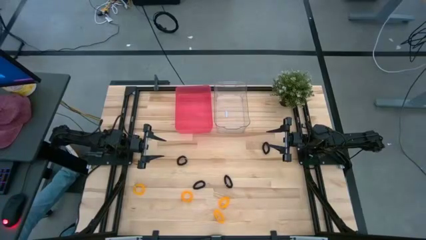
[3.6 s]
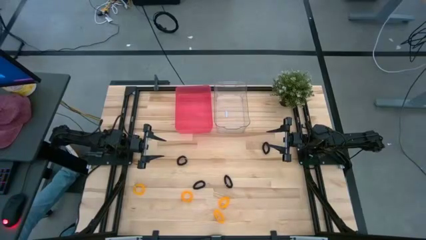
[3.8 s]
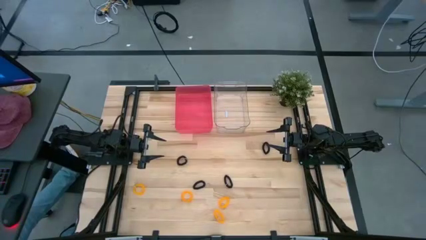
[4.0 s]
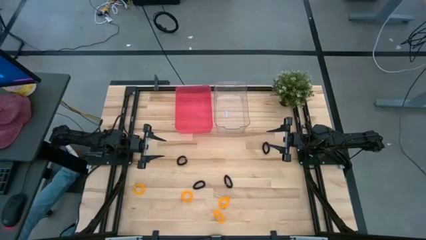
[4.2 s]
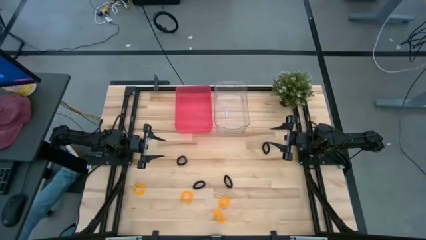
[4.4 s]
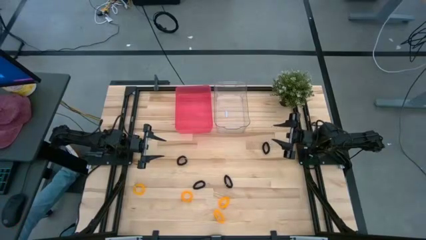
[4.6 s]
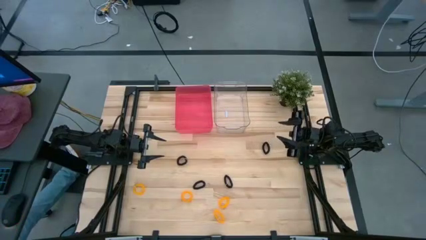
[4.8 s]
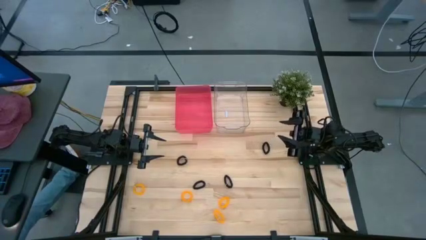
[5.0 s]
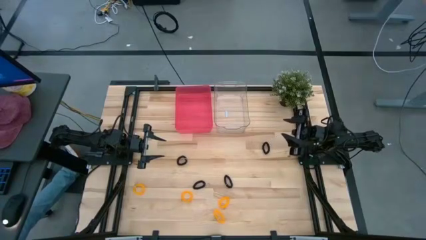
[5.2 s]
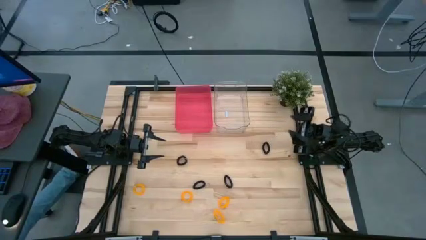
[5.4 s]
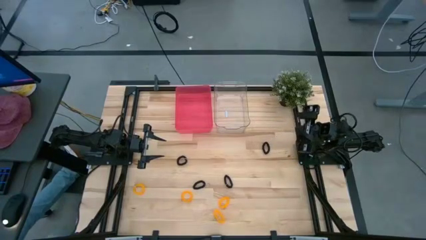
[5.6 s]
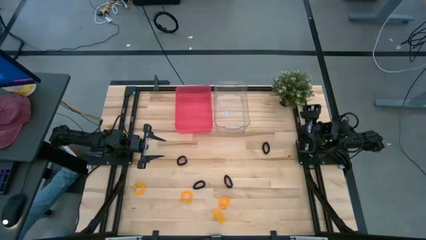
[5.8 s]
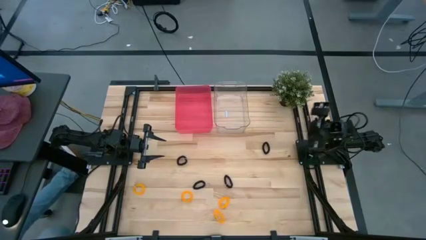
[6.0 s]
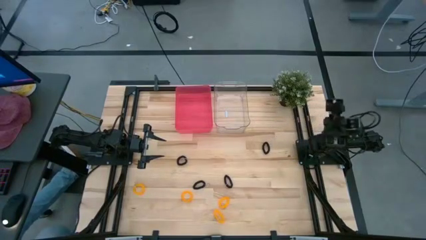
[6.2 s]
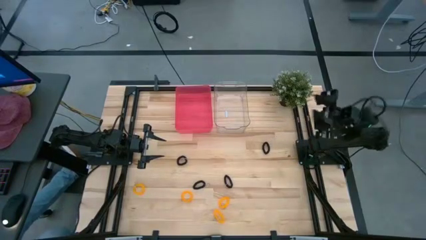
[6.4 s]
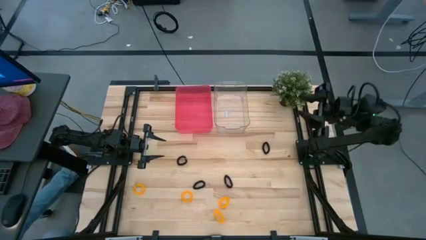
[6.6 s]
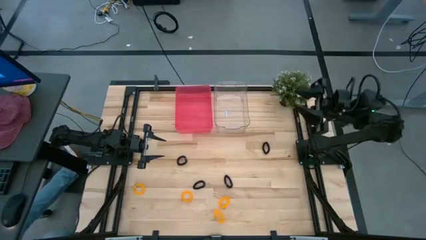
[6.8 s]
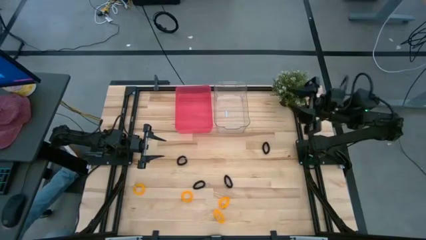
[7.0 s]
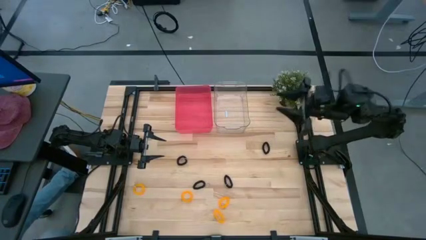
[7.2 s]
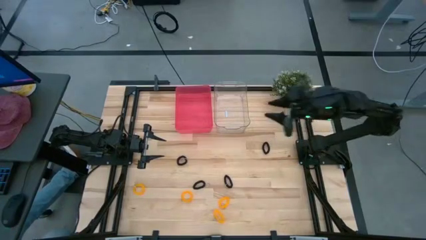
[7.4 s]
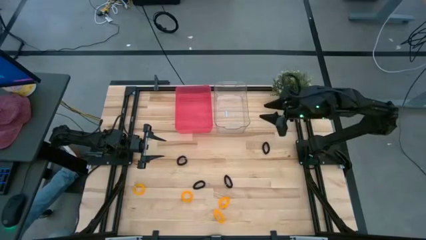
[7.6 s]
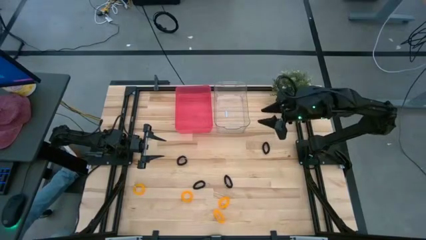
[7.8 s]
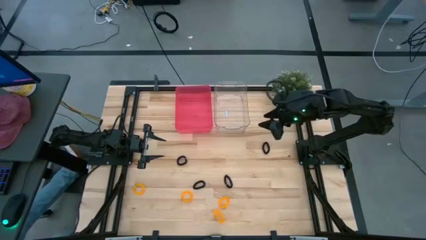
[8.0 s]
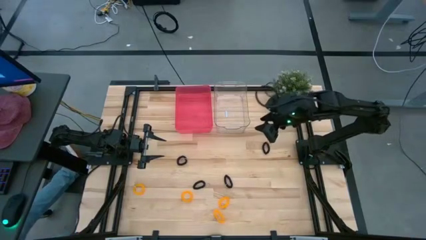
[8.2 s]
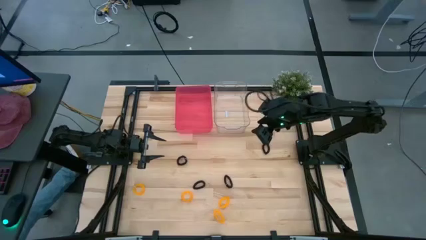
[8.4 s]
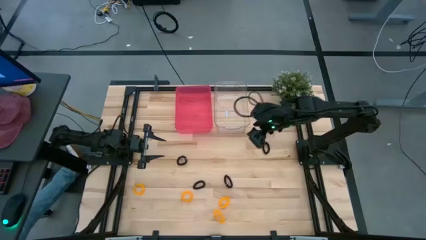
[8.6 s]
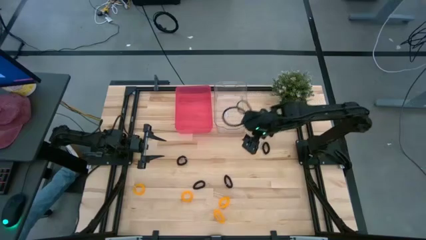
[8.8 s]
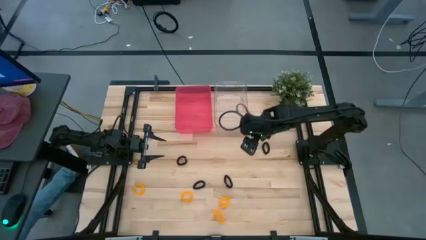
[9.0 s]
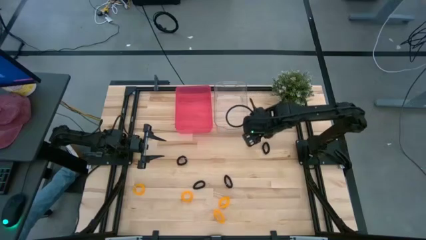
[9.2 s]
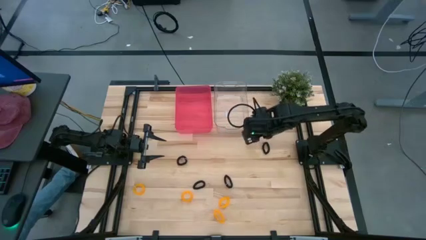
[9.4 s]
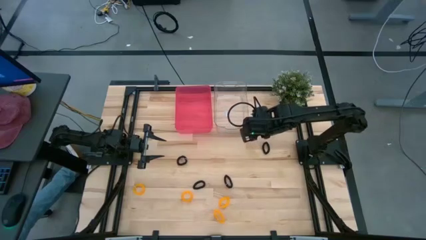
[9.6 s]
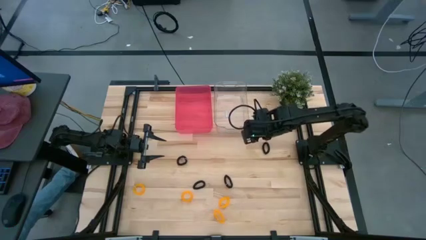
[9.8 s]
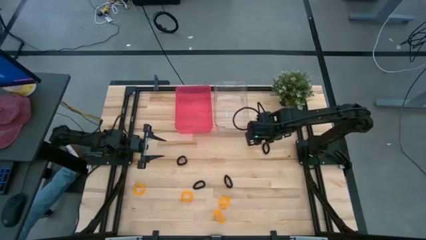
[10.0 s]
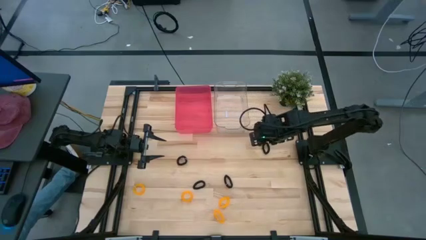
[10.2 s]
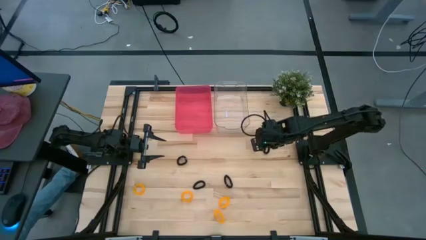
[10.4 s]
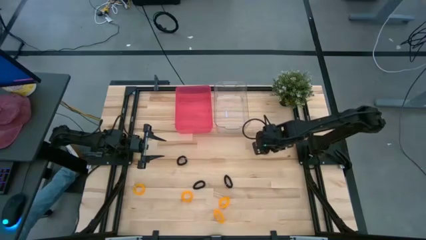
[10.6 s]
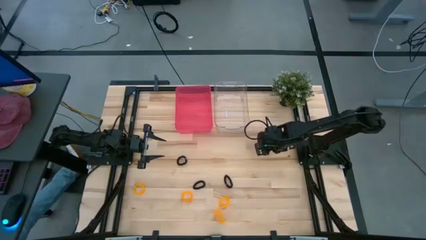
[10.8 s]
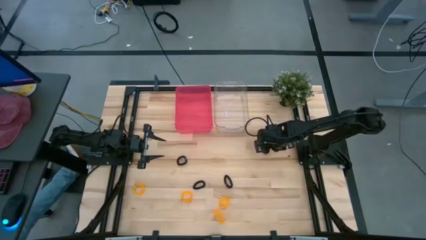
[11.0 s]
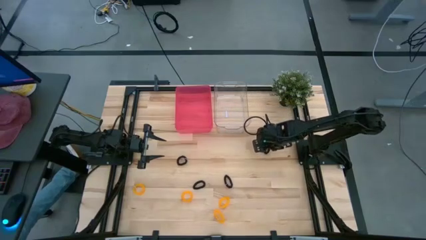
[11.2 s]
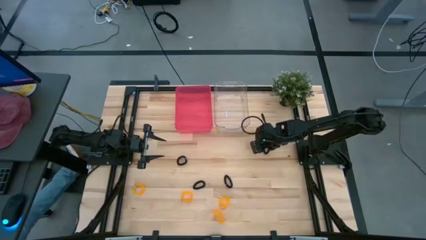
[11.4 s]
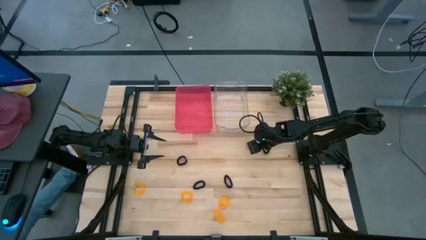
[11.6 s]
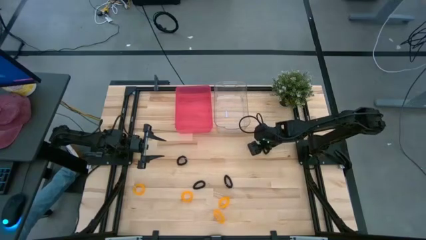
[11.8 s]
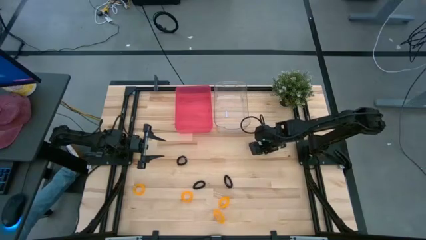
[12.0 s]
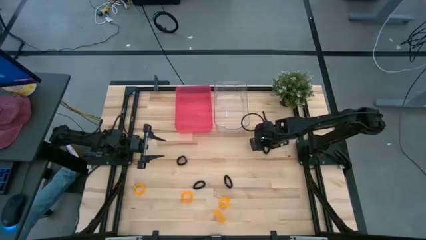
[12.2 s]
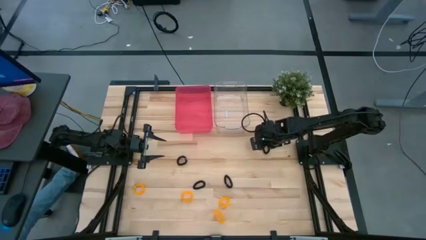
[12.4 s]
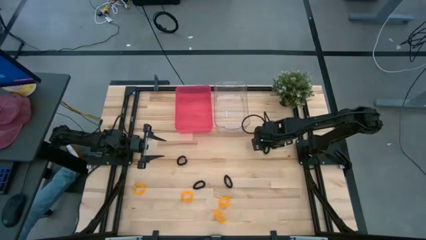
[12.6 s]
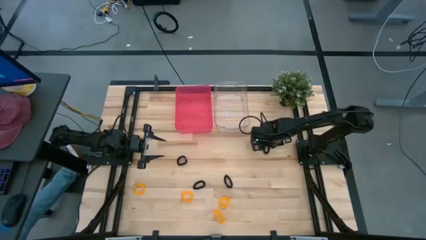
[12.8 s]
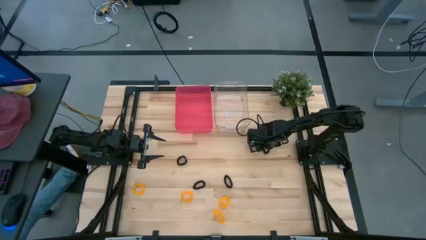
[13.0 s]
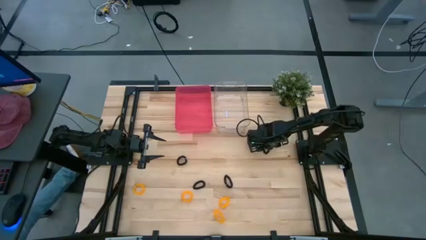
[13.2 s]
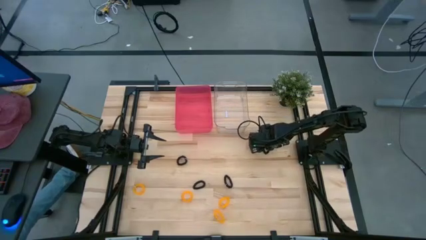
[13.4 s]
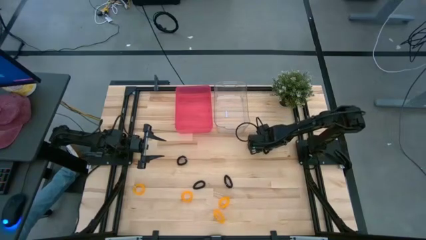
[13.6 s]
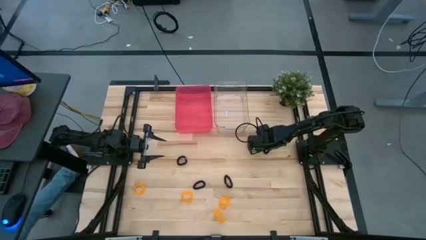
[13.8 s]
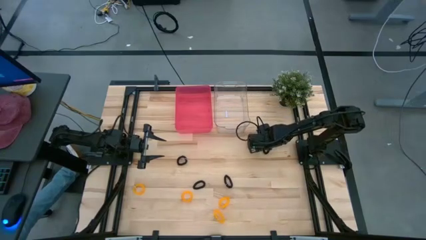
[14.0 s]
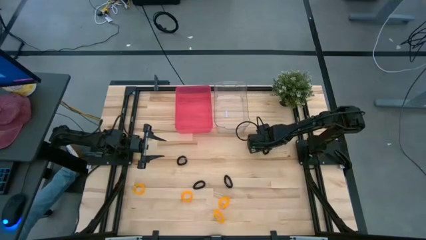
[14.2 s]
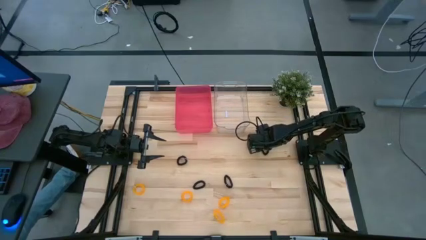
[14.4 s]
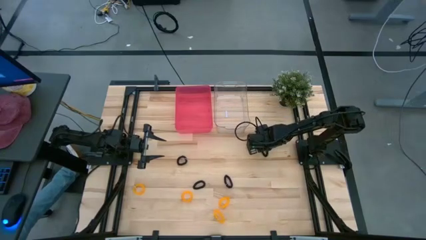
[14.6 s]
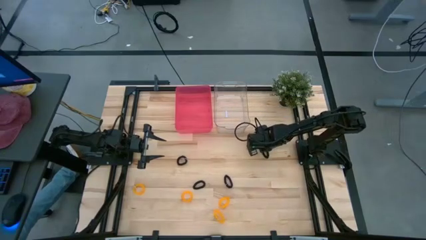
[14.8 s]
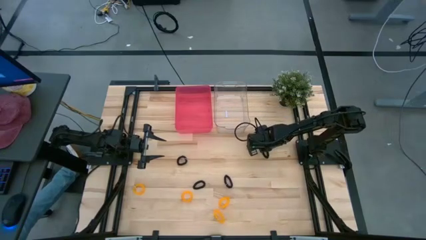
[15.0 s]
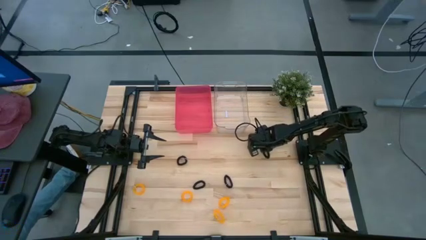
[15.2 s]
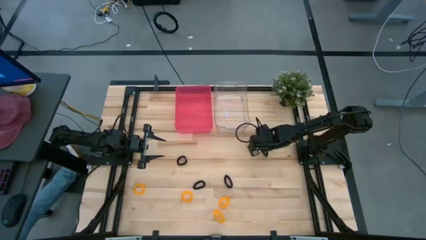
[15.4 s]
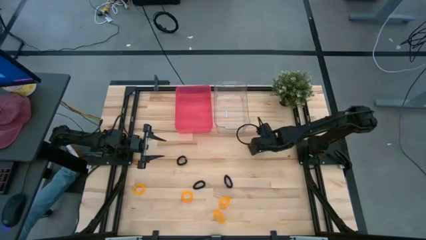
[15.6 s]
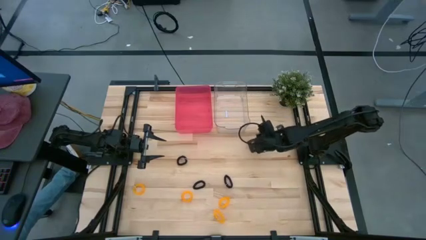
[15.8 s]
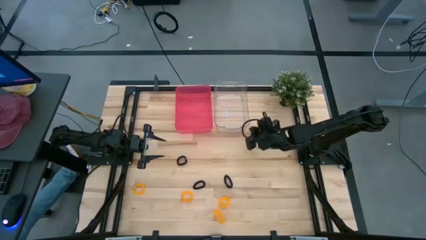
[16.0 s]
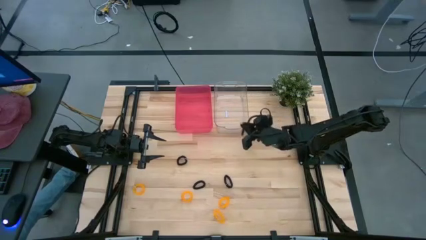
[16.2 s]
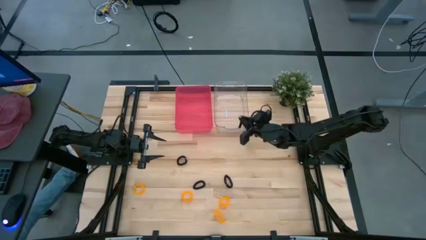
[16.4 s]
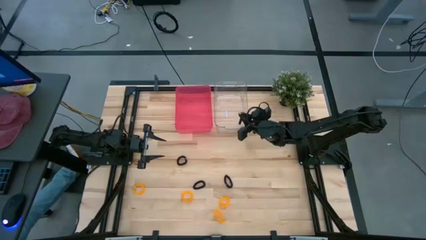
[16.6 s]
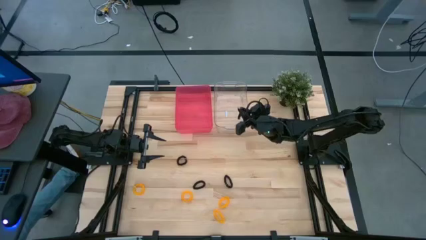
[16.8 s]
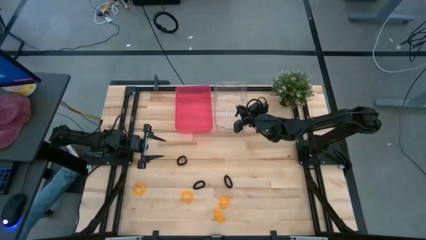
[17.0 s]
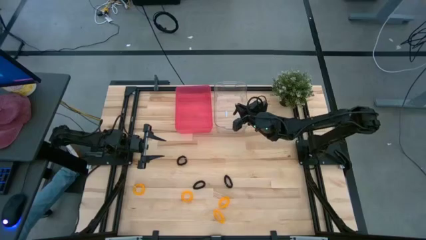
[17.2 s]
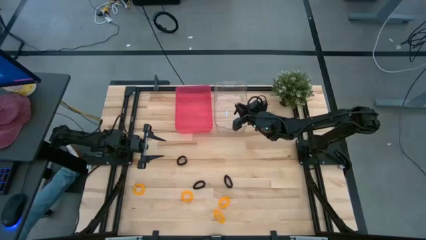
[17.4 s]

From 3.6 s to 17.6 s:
Task: Sort spring keychains
Put the black spring keychain into the transparent bin
